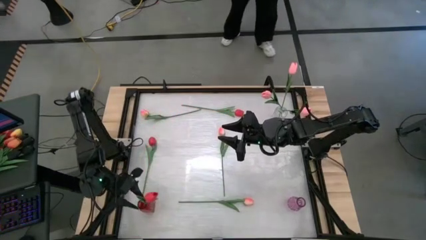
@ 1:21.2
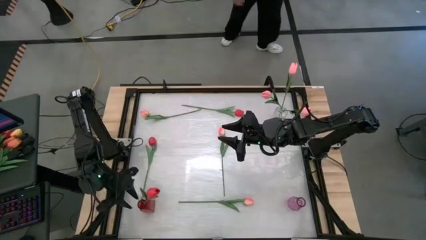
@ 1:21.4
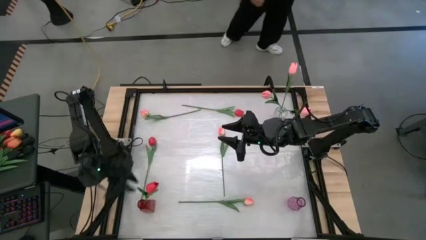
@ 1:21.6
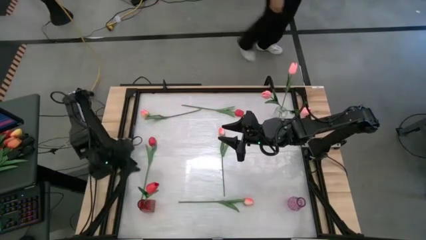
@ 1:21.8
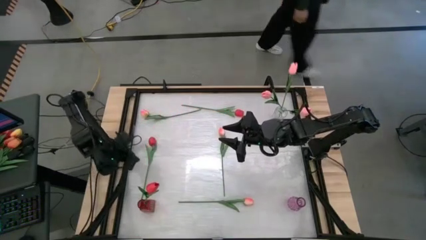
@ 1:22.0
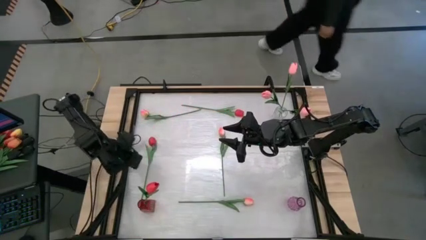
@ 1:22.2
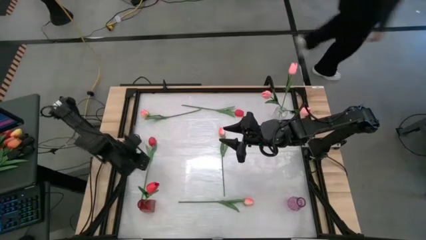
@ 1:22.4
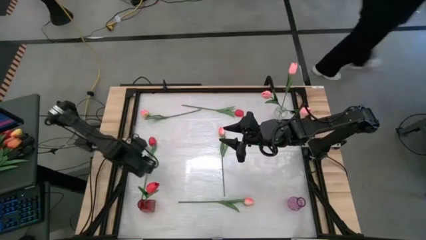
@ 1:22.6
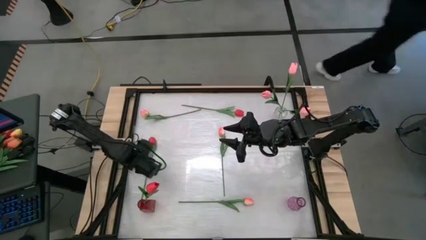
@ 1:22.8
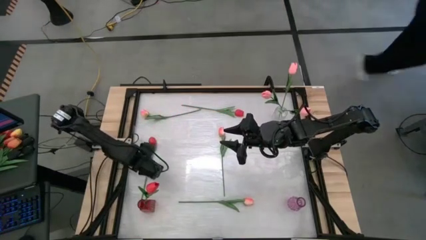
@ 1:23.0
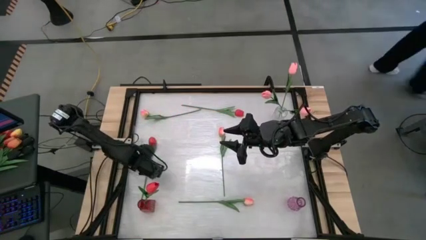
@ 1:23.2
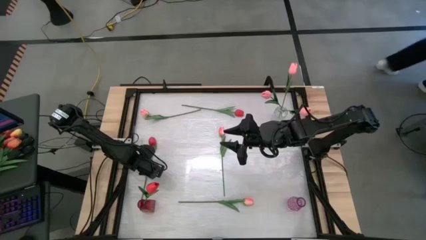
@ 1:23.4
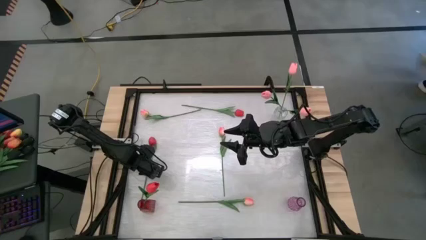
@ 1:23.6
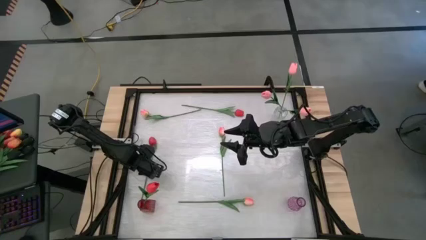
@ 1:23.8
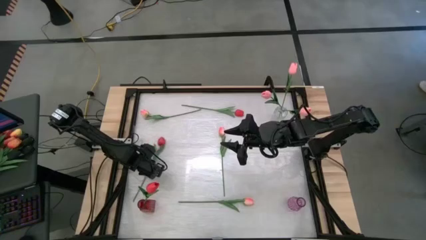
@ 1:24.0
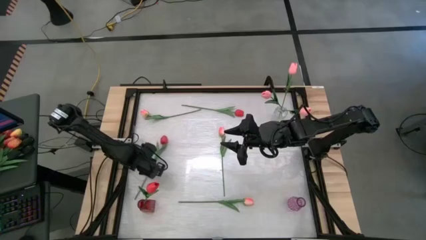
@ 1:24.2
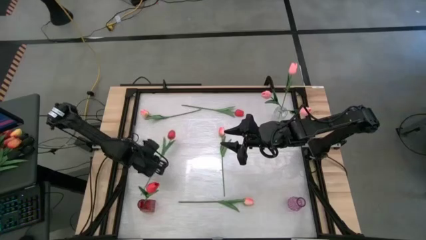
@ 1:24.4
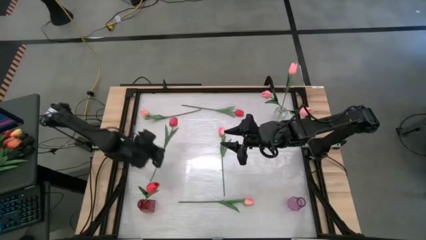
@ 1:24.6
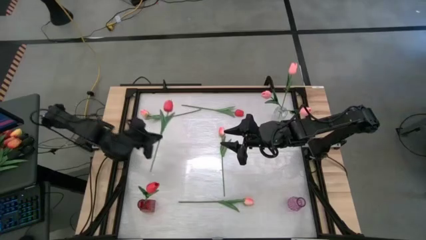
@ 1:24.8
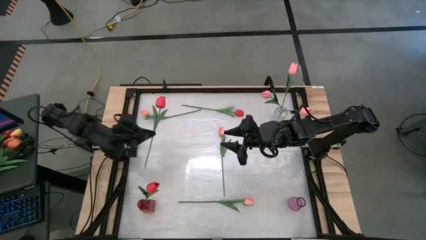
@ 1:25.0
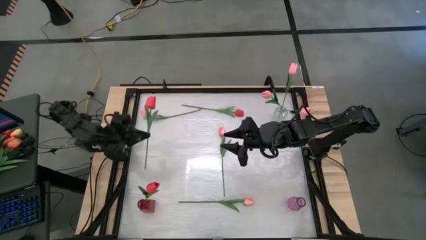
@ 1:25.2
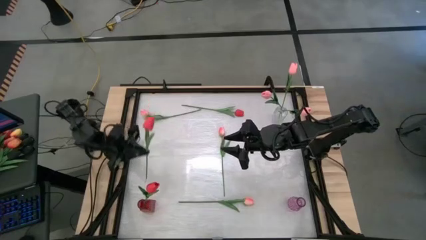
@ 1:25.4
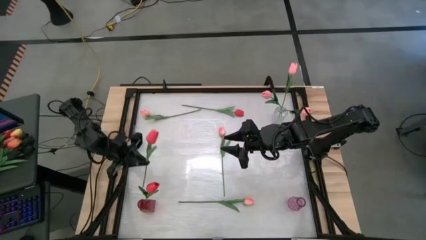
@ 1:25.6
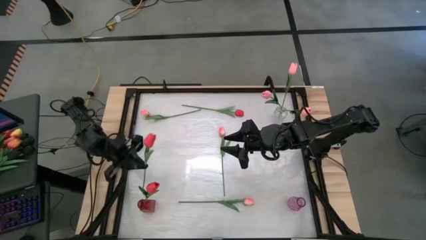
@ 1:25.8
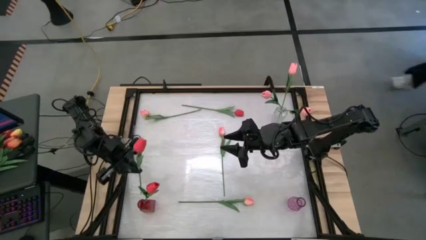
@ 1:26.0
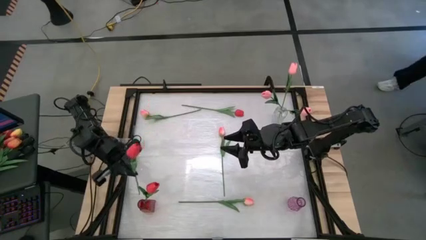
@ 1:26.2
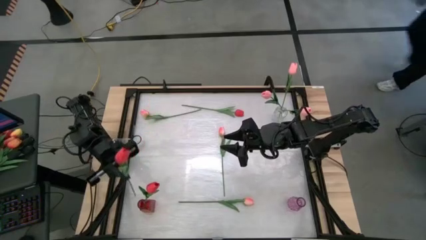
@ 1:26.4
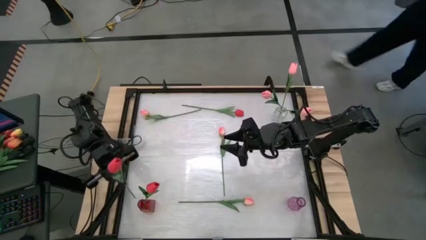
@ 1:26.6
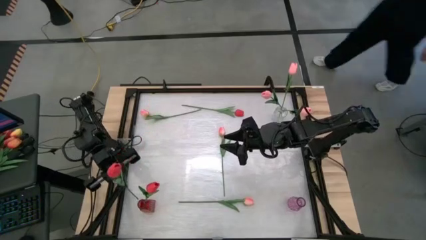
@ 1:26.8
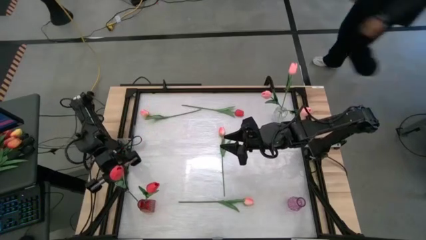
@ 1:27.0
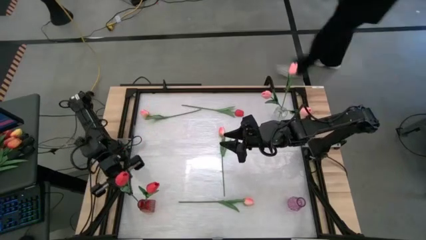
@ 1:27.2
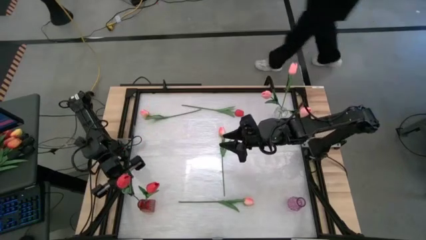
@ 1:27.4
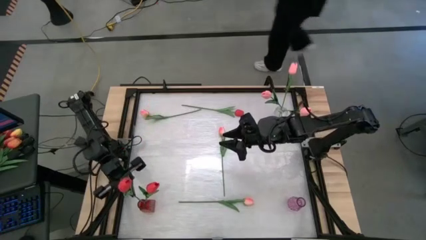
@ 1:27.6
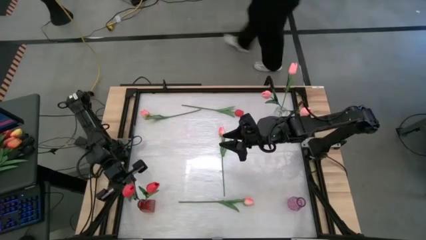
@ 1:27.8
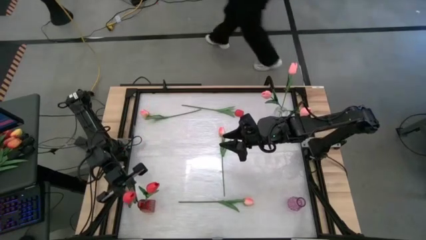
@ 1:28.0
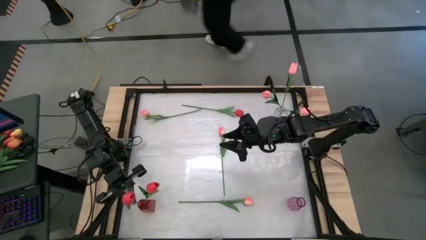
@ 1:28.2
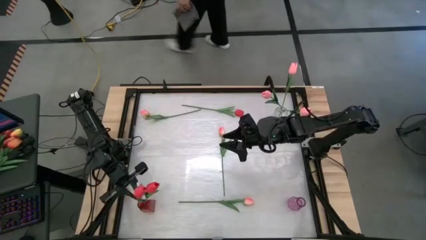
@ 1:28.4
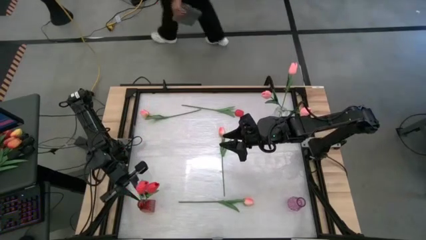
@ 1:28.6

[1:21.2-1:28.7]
Task: Sort flowers into vase by color
Put the red flower in the red vase

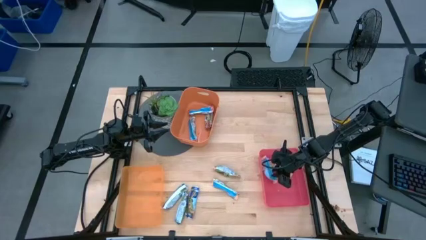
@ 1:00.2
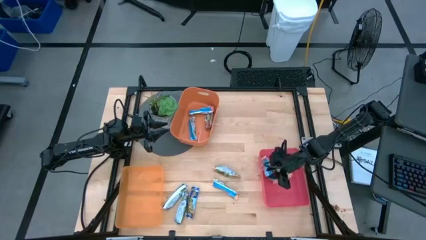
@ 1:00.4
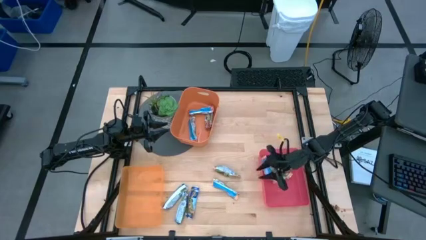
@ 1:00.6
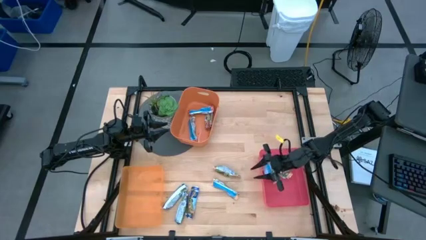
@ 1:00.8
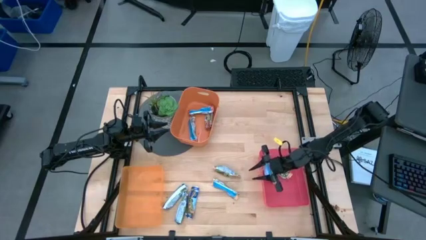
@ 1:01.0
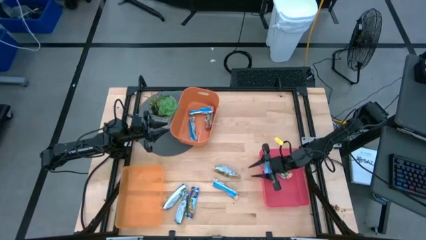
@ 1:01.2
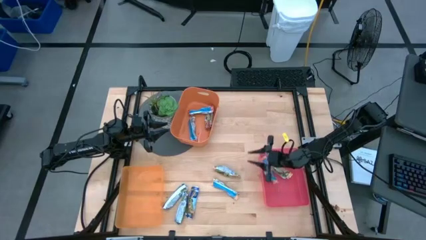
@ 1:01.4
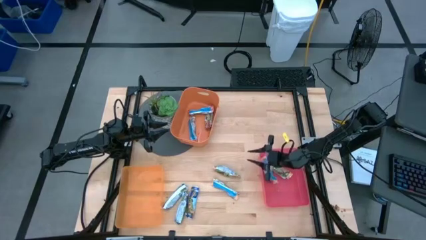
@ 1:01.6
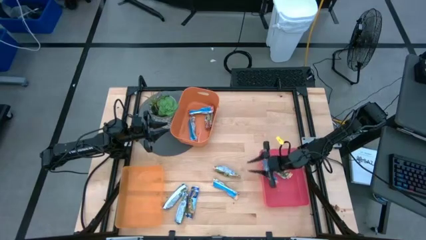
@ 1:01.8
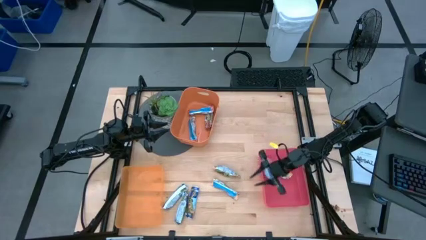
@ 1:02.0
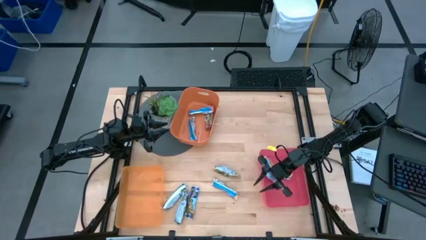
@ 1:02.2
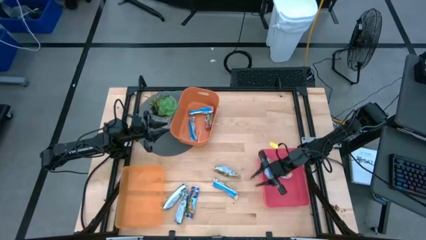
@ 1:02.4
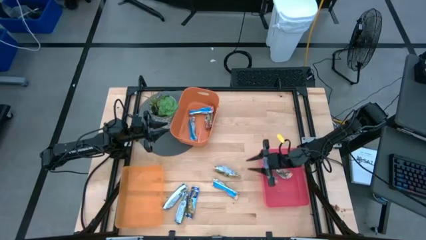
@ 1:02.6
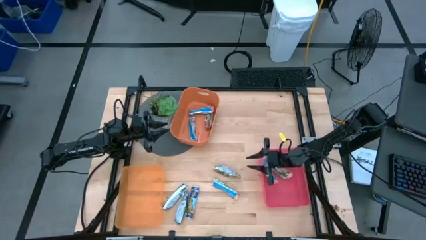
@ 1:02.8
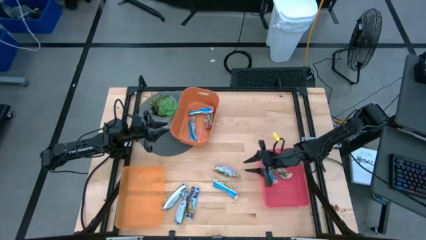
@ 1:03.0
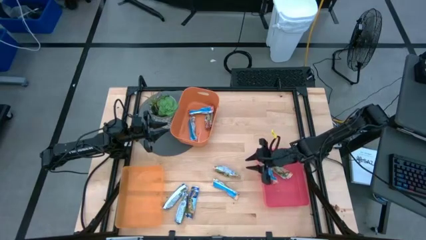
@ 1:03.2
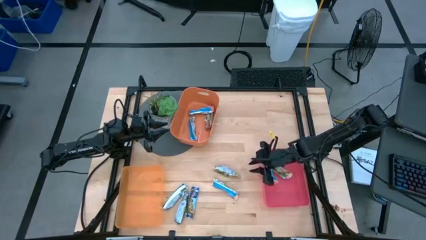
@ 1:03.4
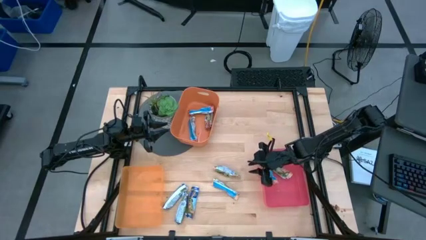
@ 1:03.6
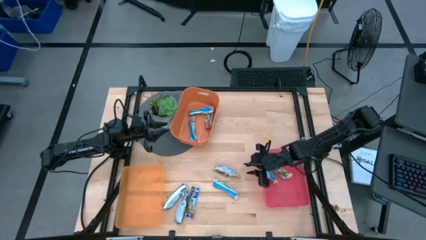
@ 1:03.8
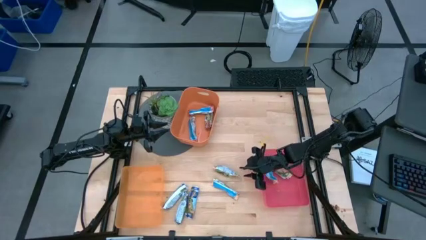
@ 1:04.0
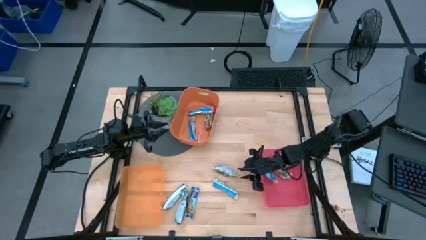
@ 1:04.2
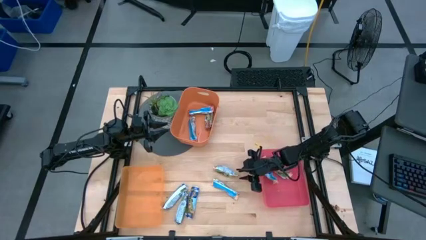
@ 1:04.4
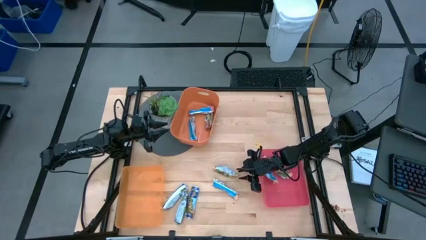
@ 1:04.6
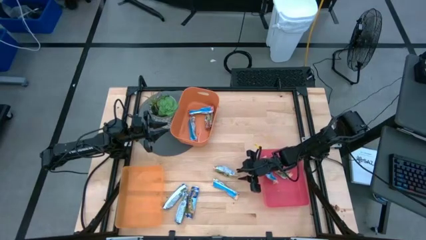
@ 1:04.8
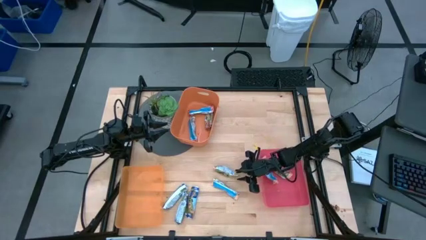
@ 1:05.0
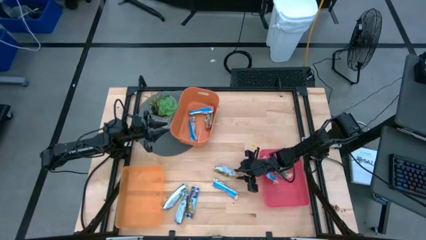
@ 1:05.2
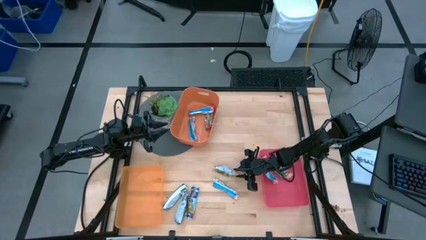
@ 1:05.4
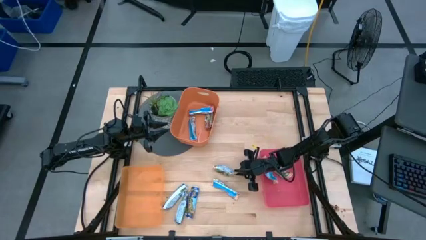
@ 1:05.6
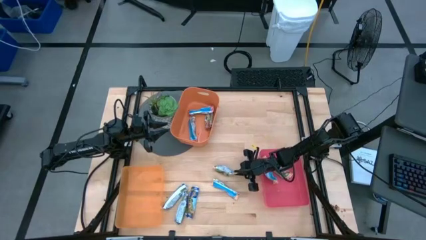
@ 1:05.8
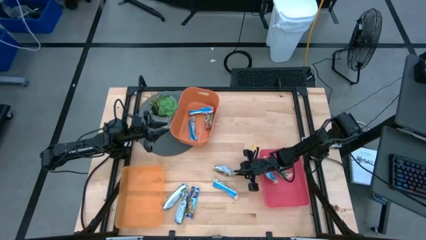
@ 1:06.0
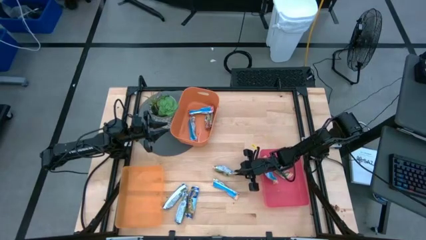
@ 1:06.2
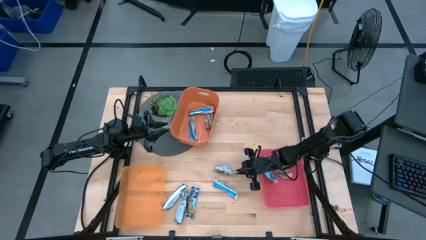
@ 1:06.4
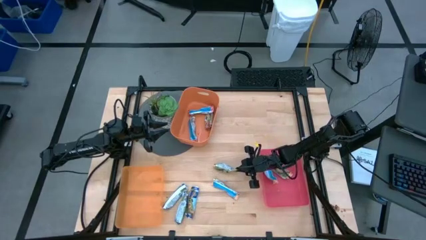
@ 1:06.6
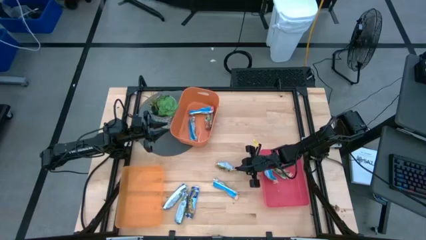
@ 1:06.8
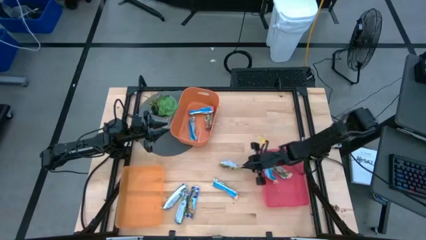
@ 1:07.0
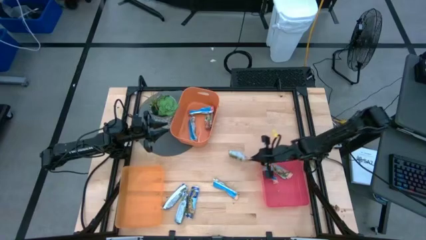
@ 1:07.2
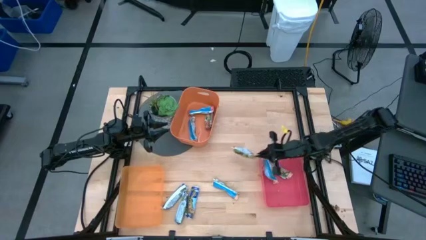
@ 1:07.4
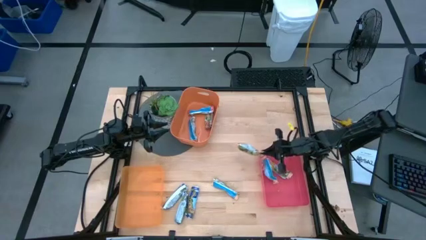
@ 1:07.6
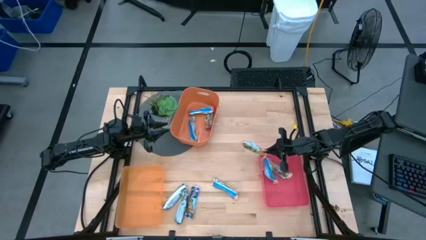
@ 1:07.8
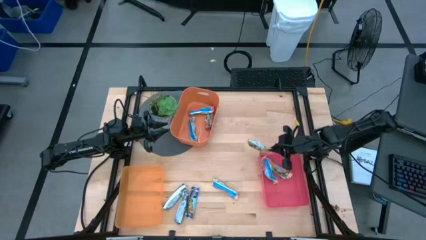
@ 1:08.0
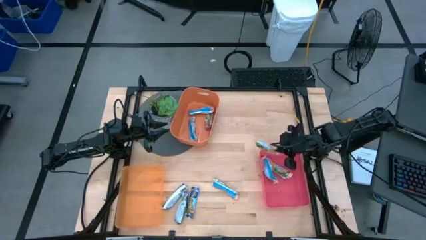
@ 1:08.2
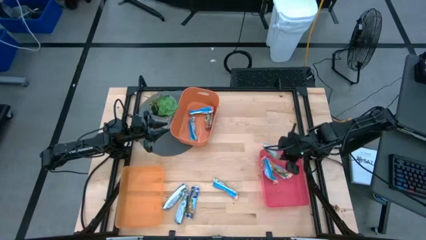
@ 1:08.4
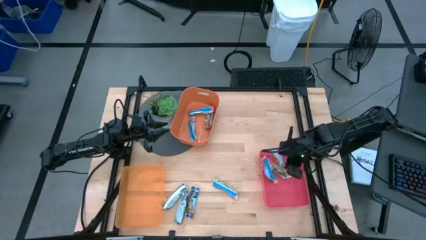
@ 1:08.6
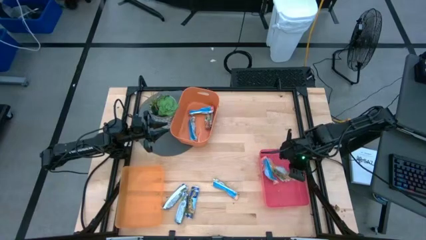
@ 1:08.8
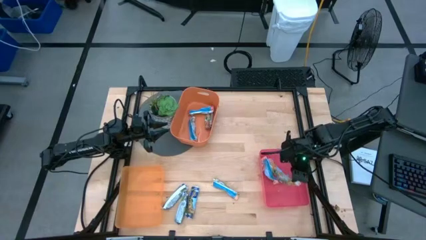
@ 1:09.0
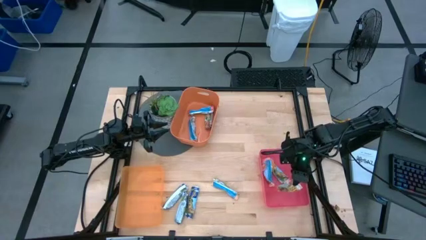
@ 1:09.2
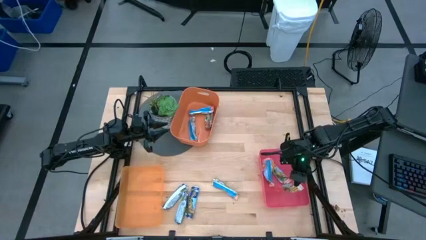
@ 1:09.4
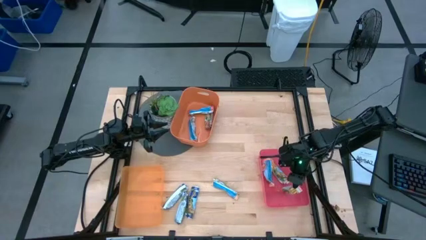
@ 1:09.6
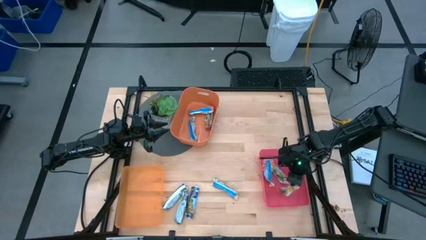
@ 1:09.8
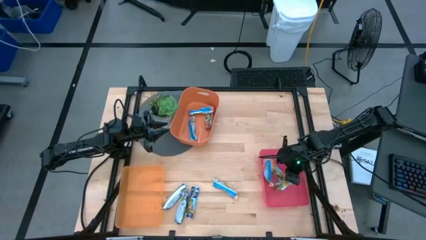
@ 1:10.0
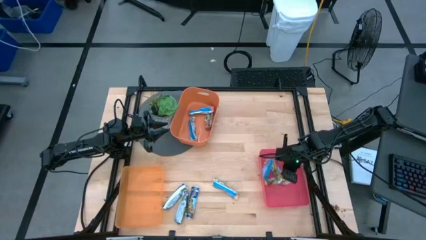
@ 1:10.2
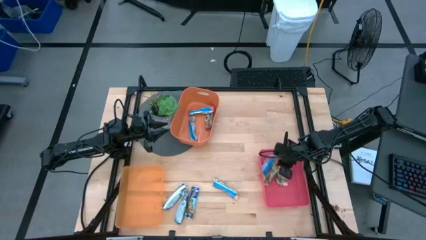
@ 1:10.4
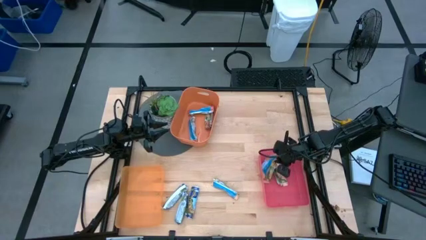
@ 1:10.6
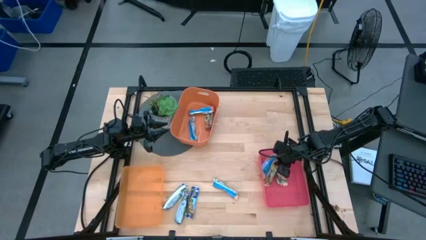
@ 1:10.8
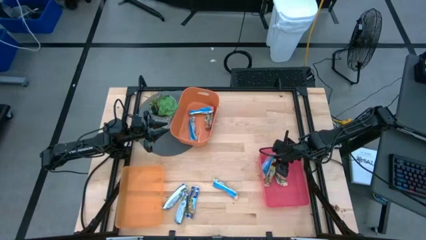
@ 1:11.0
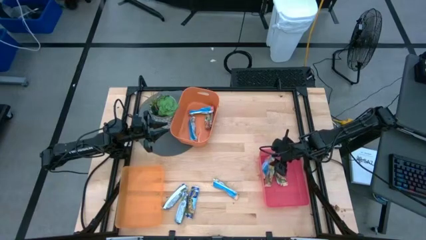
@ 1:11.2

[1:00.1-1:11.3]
Task: Pick and place Granola Bars by type
Put the yellow granola bar into the red bin
